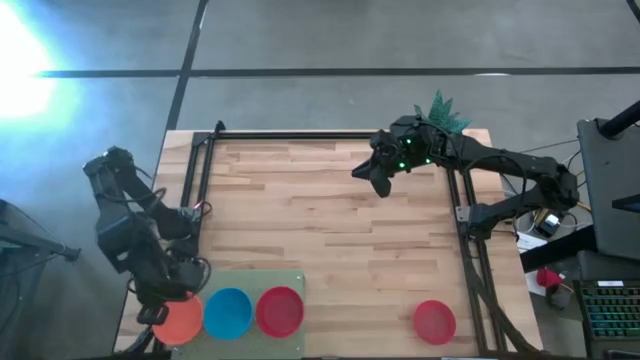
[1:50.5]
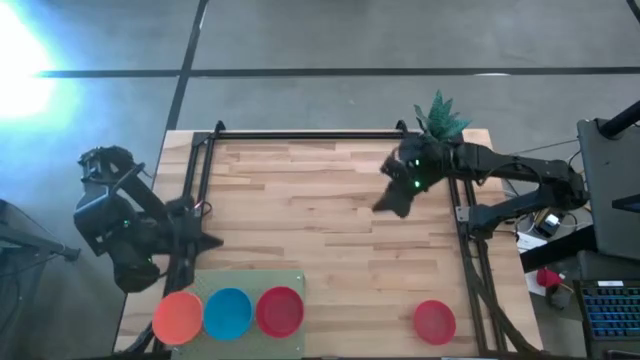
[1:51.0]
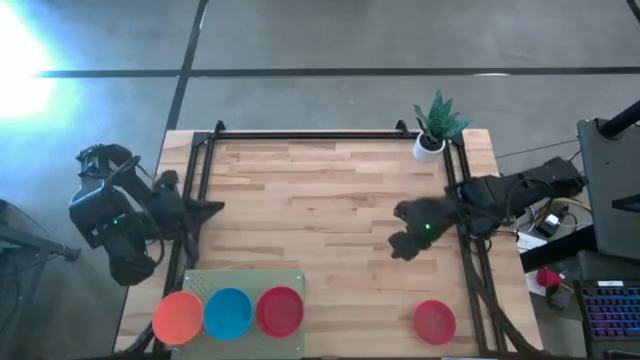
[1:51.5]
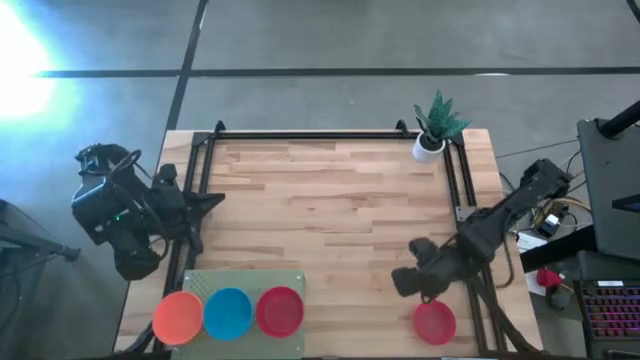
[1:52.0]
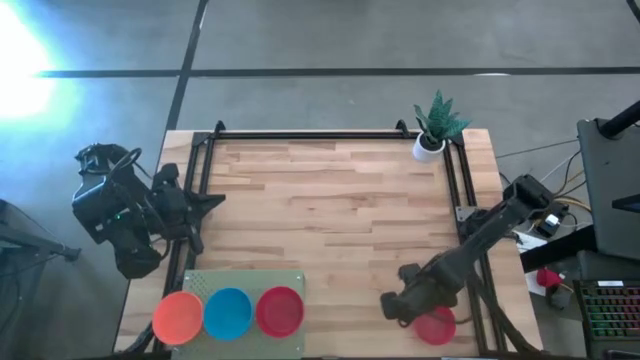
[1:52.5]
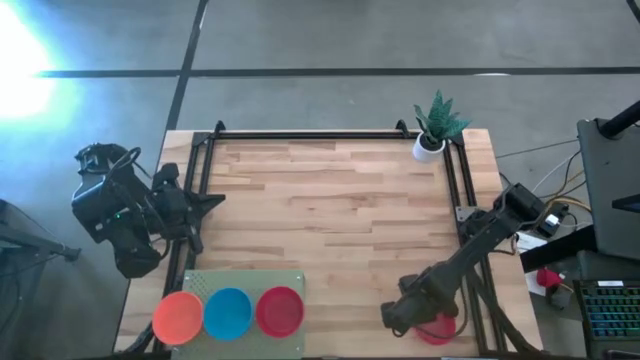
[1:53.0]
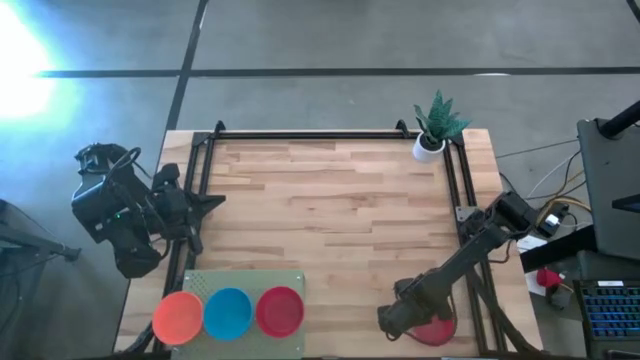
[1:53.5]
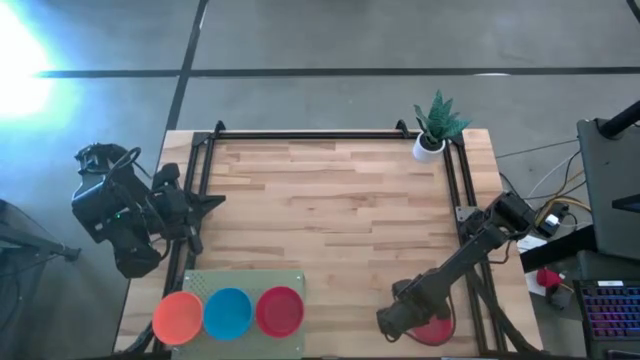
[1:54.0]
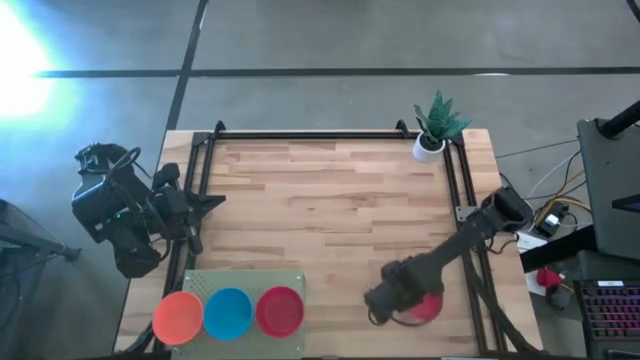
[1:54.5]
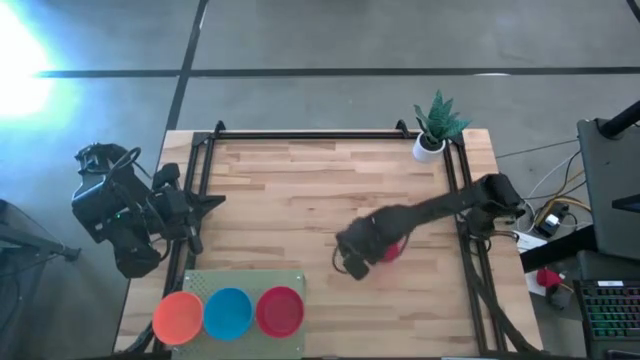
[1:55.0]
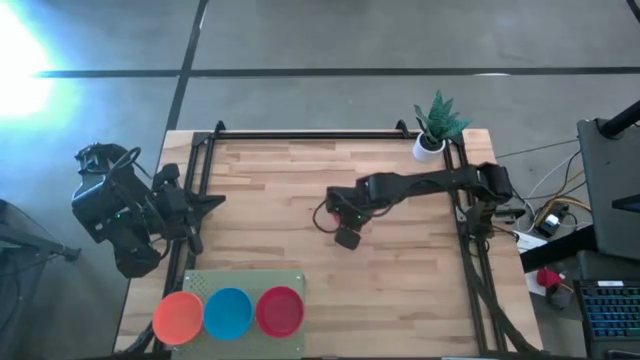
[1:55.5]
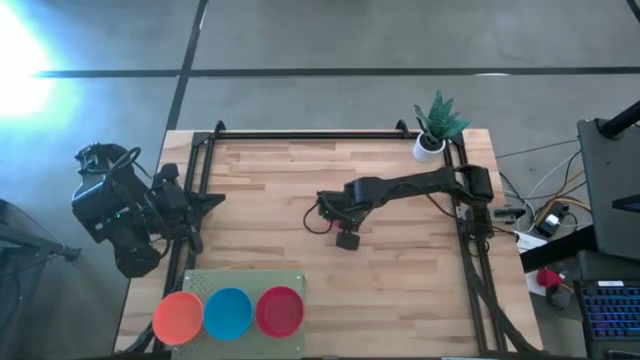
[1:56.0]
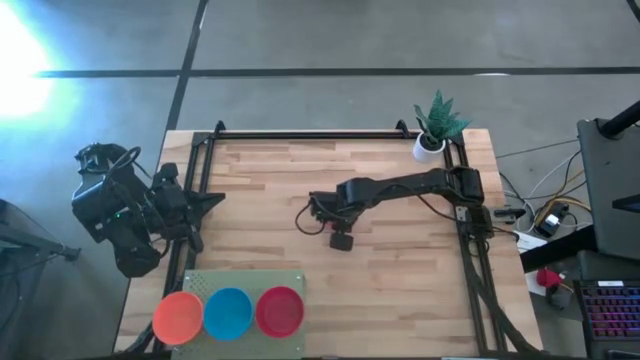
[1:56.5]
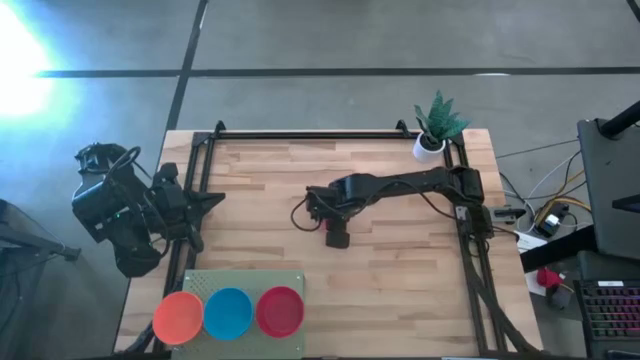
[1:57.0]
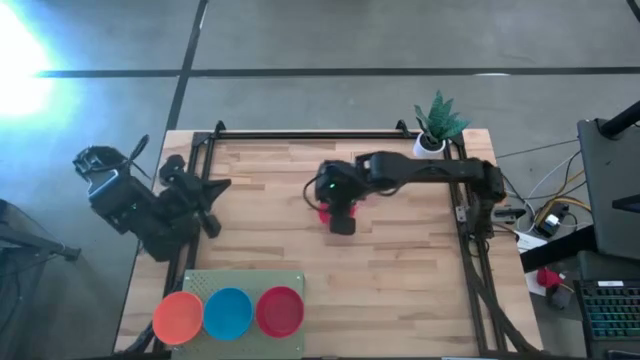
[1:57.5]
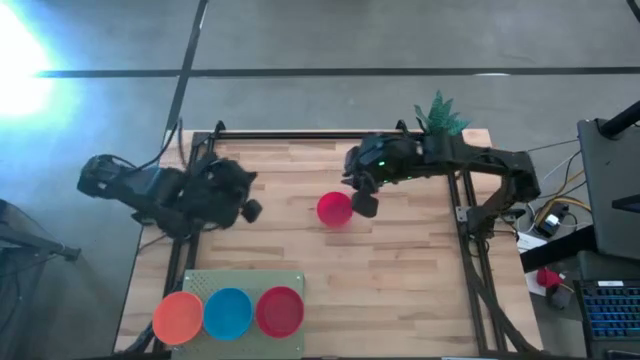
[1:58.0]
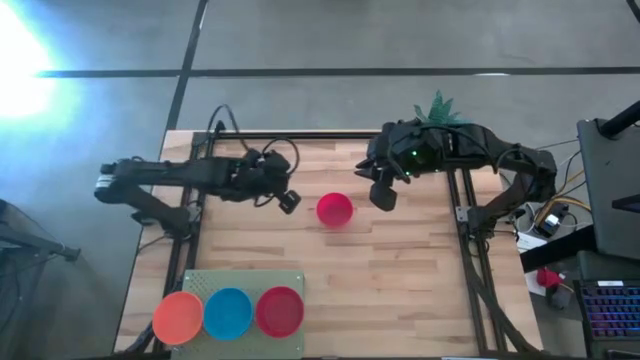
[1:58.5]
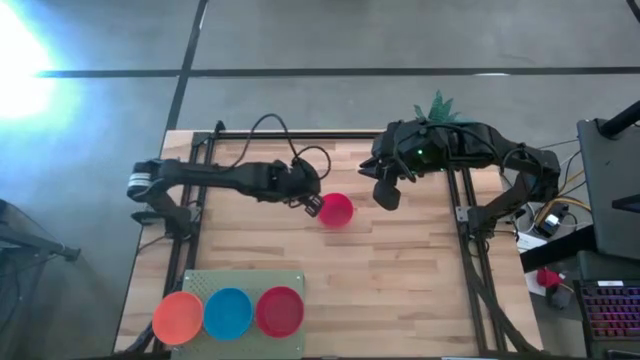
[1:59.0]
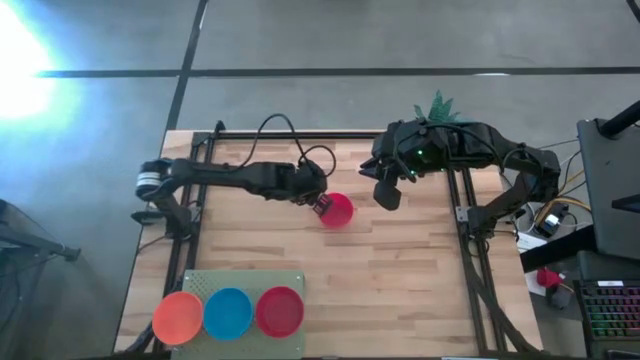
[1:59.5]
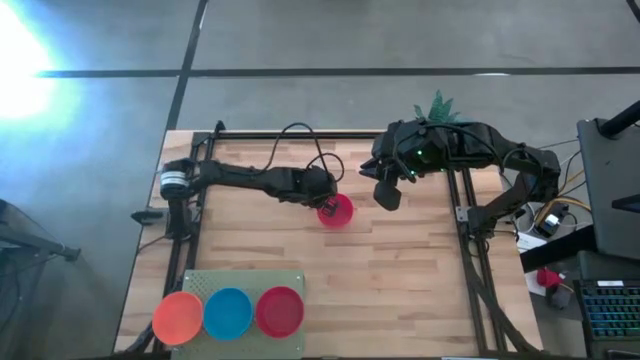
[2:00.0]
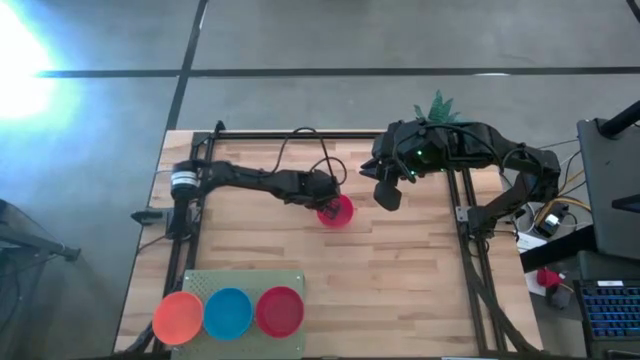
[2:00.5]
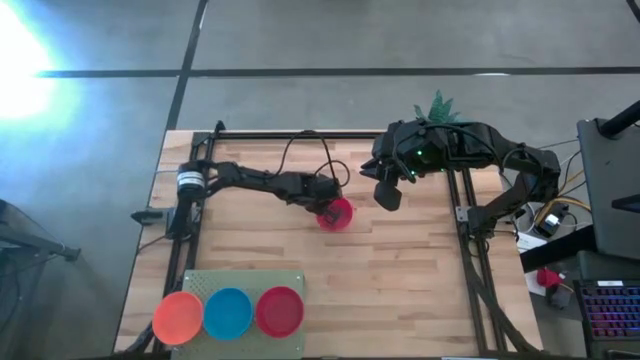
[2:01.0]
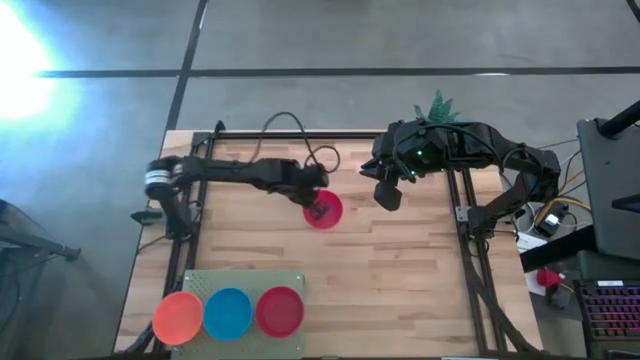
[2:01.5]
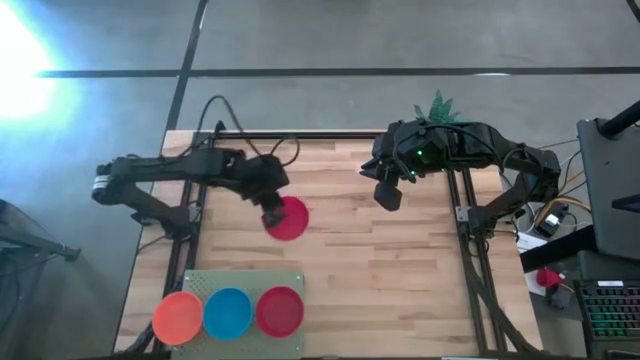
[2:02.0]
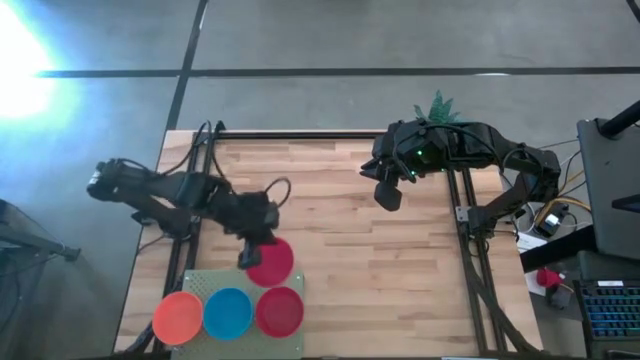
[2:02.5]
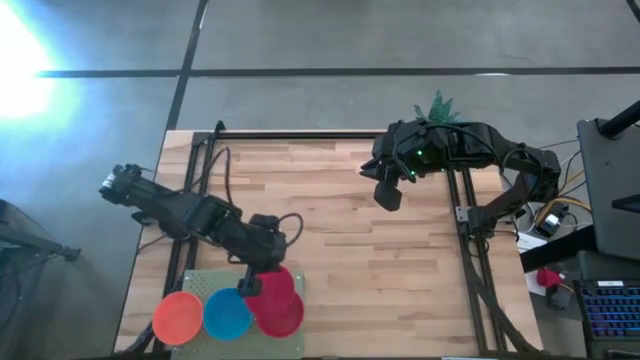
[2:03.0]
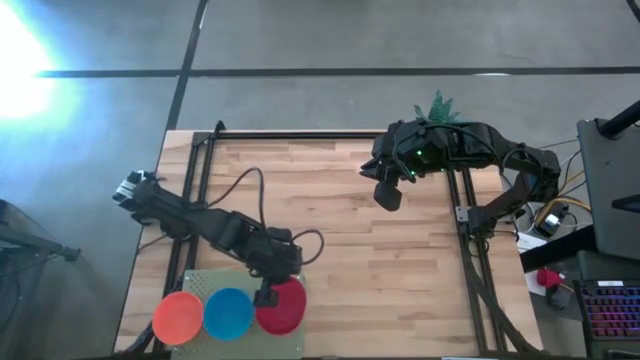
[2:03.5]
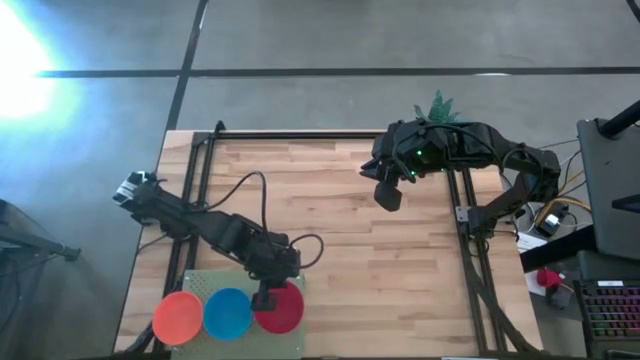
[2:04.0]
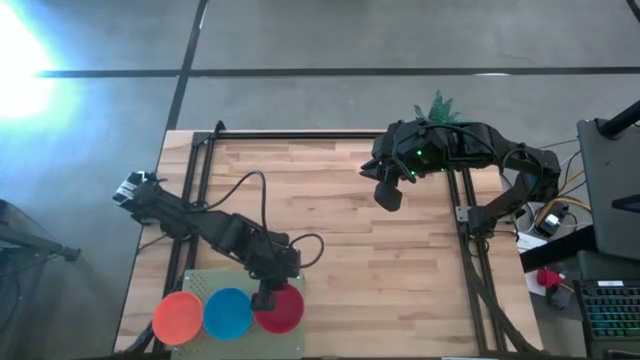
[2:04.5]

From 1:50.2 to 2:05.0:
Task: Pick & Place Mini bowls
Stack the red bowl on the red bowls on the shelf

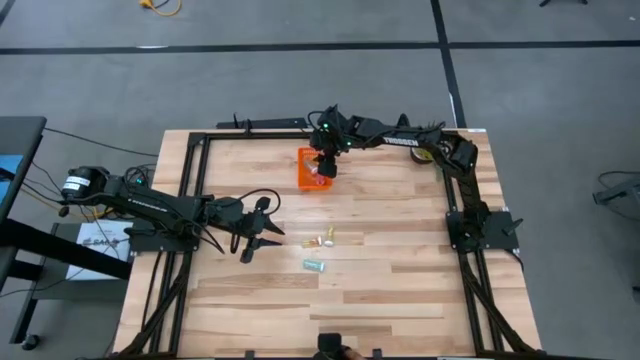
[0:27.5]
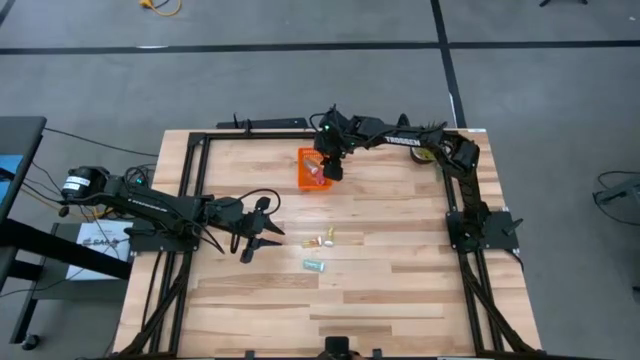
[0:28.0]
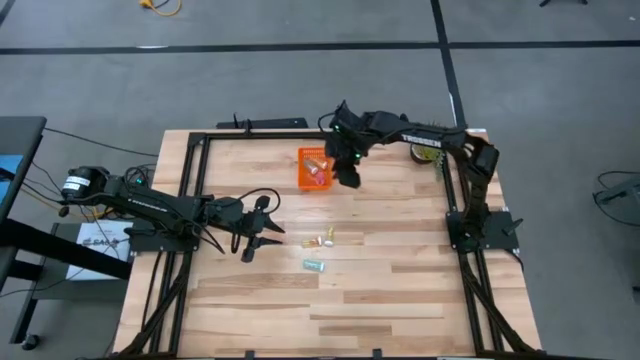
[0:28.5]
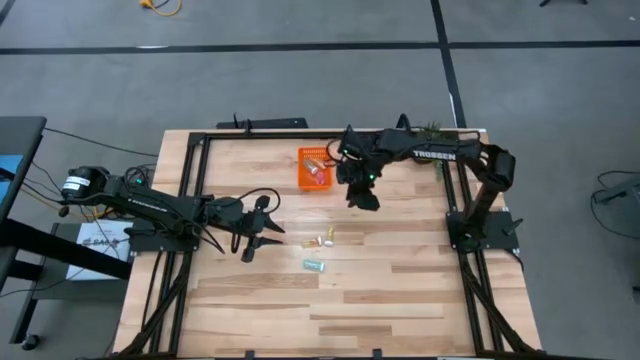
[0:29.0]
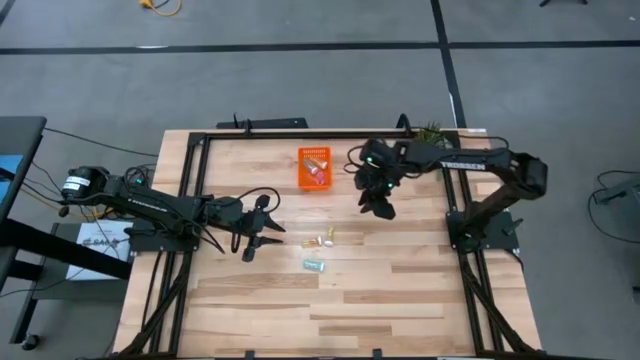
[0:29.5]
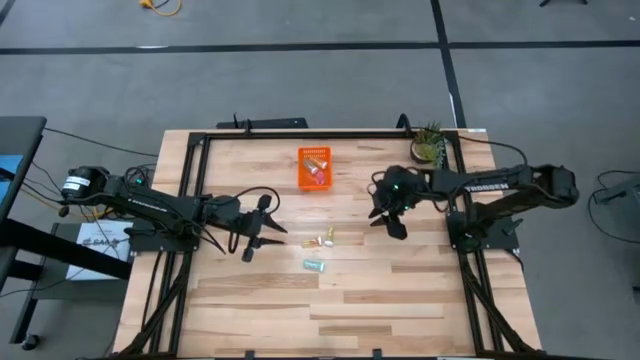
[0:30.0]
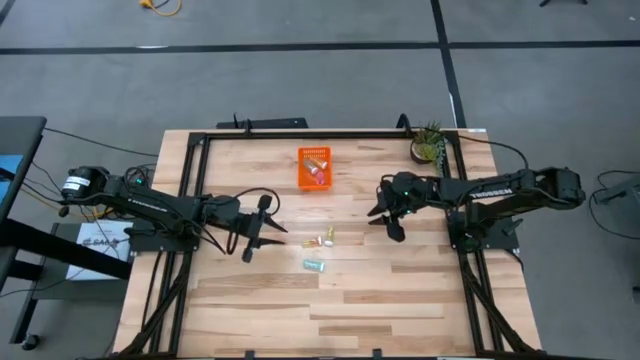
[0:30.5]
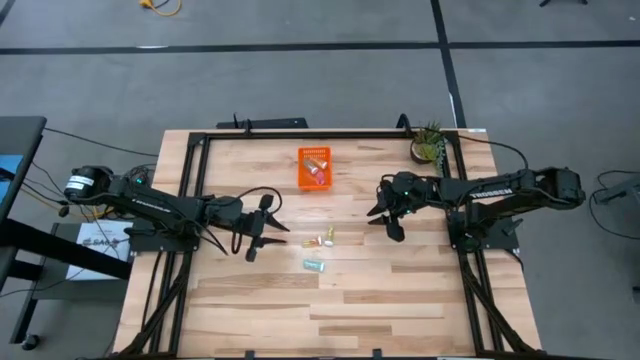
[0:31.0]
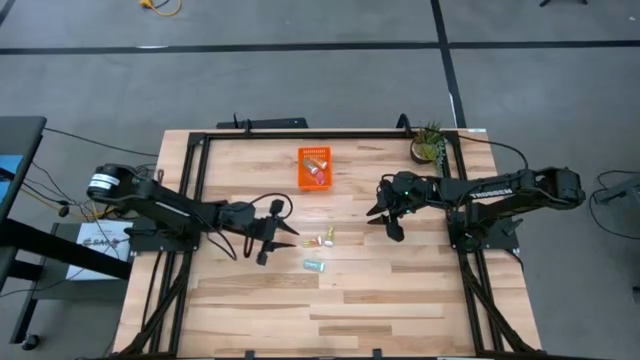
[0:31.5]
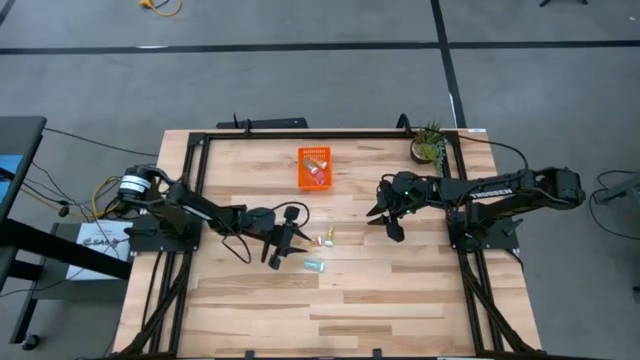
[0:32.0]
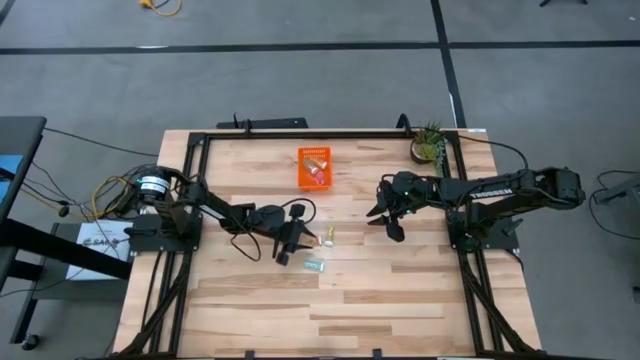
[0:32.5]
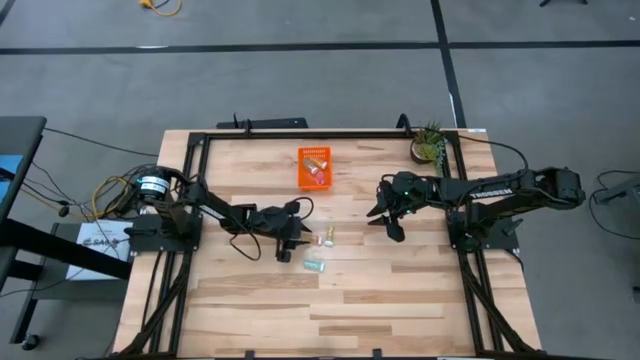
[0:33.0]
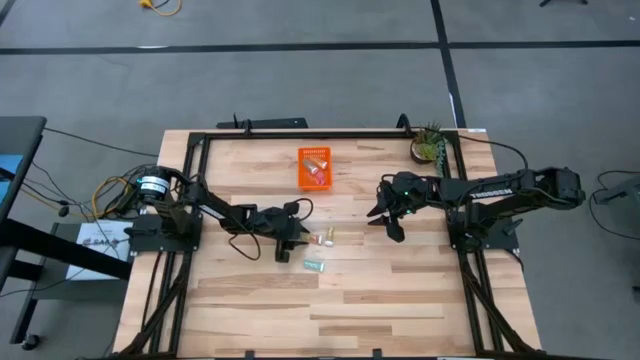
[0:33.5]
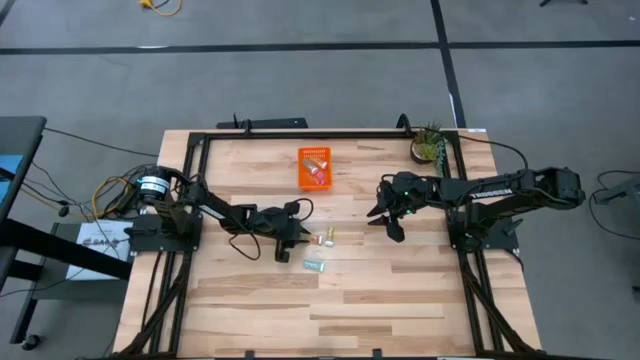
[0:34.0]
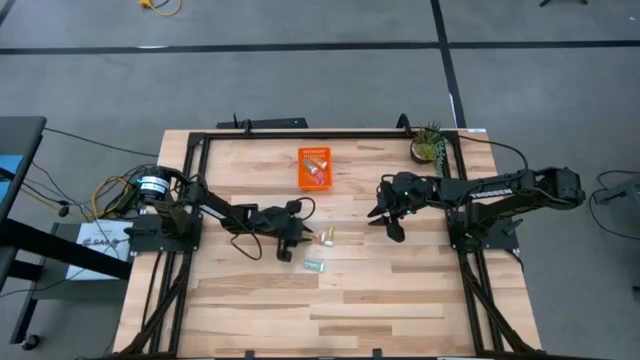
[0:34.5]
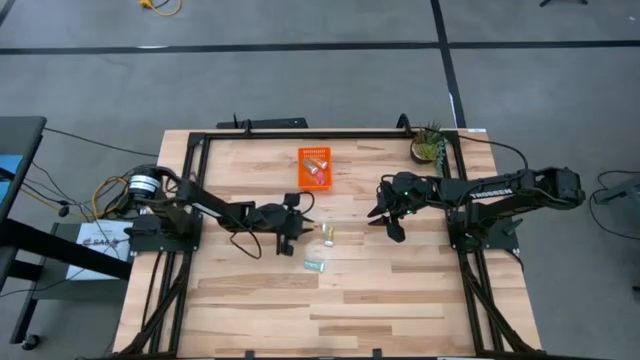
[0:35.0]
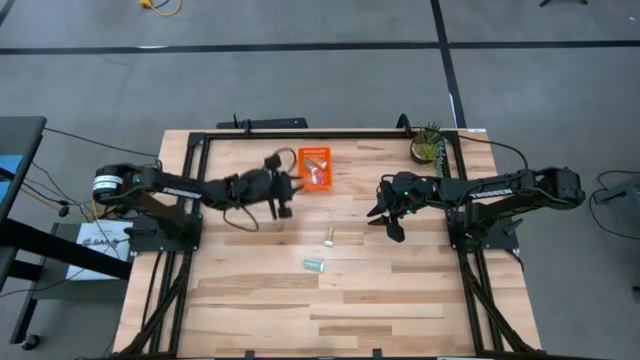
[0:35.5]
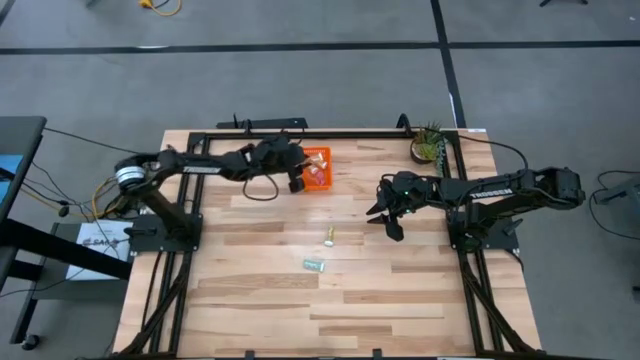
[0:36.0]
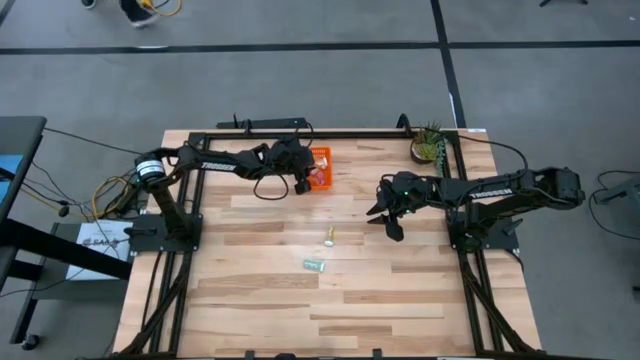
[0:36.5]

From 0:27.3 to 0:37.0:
Task: Pick and place pill bottles into a basket
Put the yellow pill bottle into the orange bin
